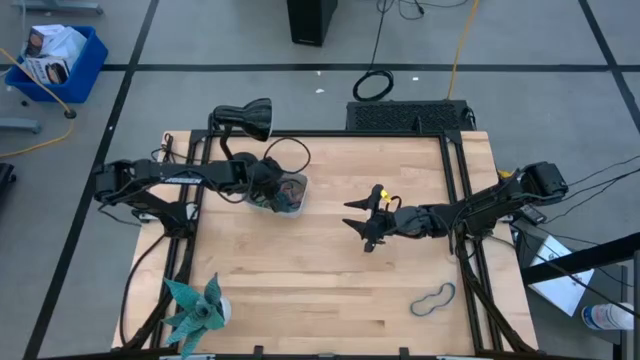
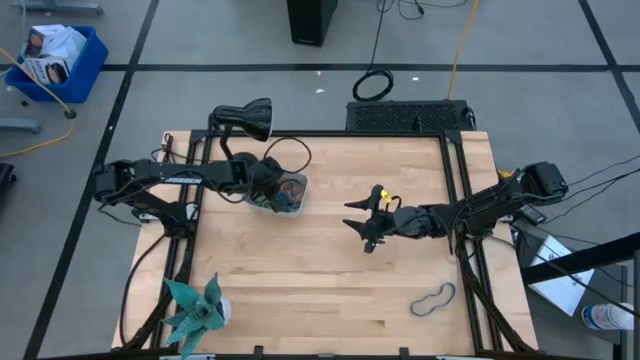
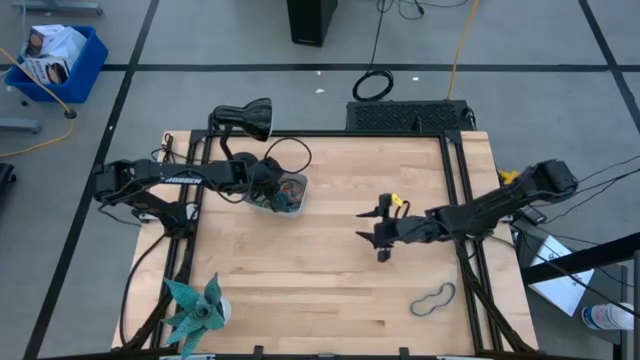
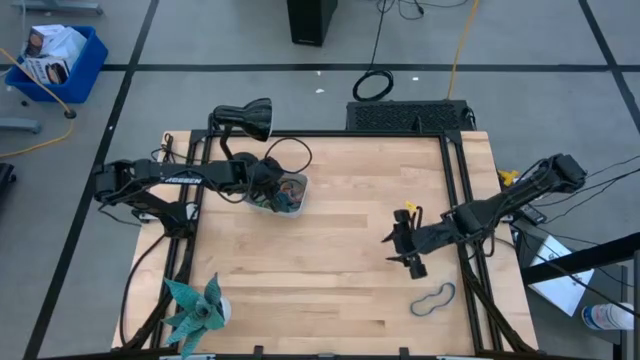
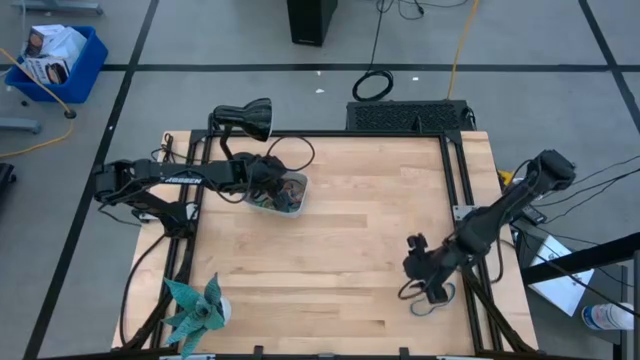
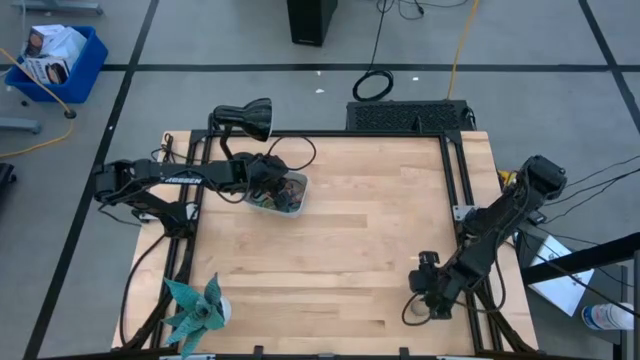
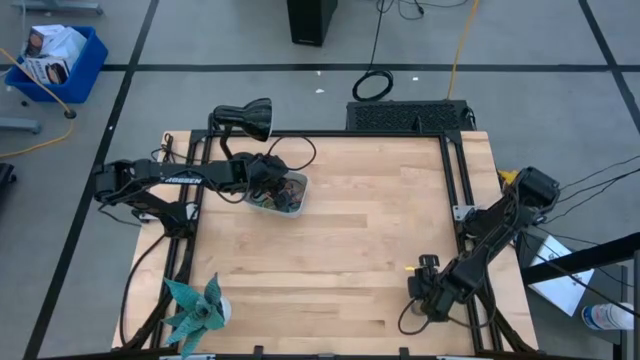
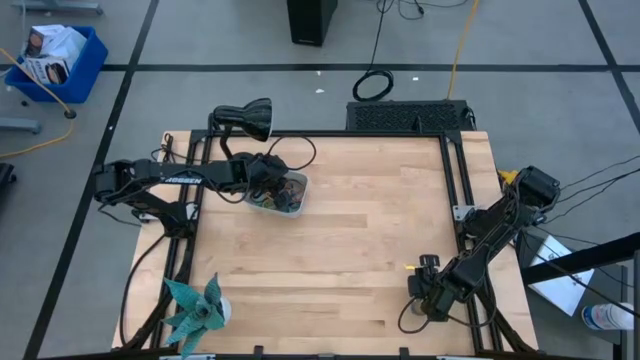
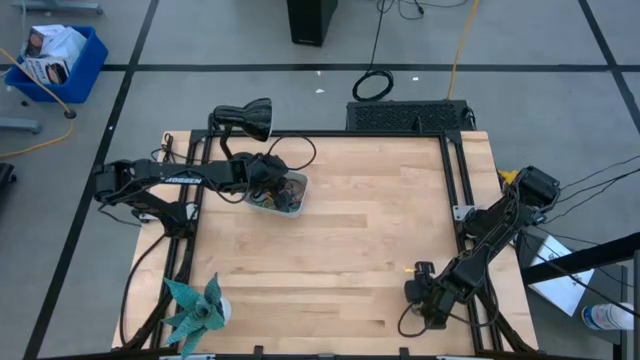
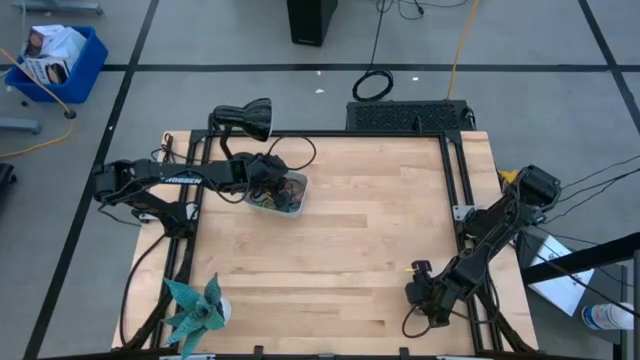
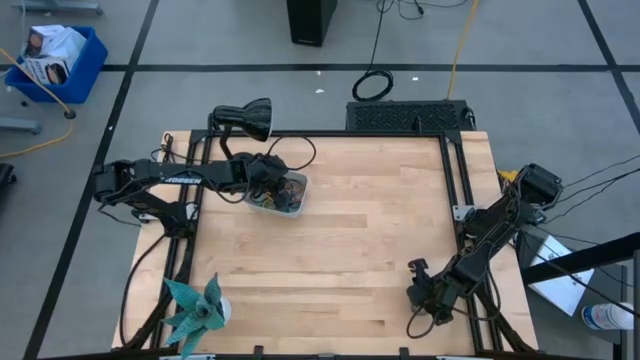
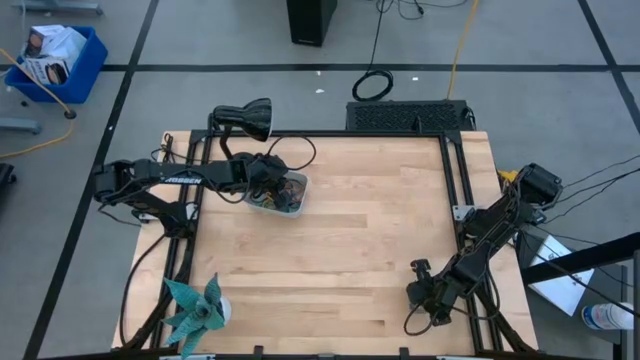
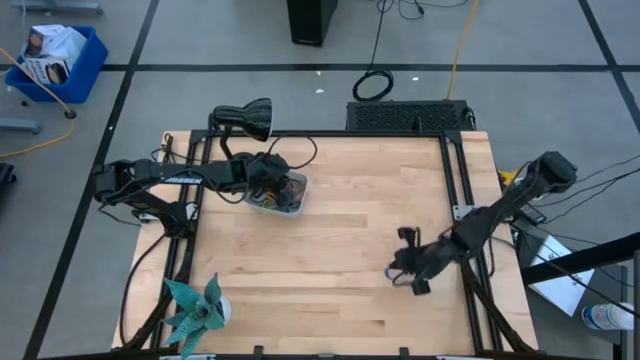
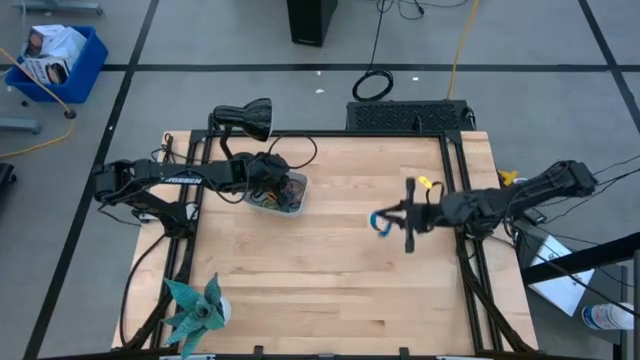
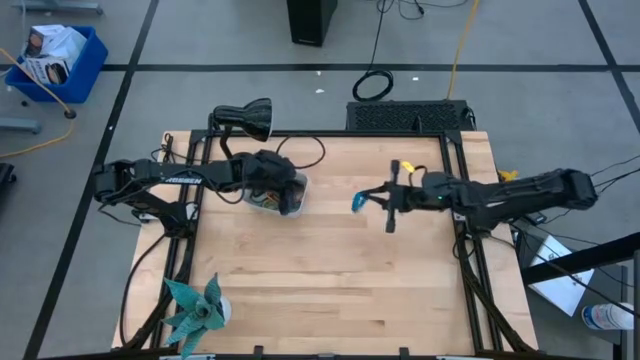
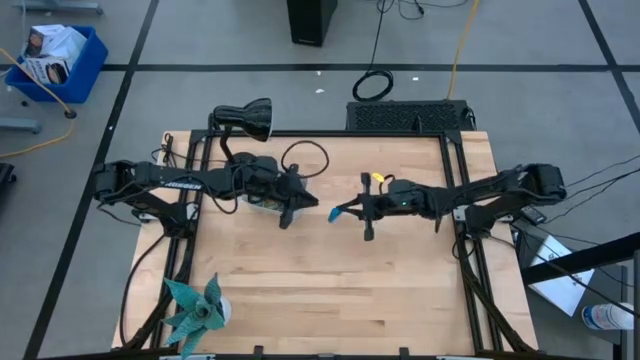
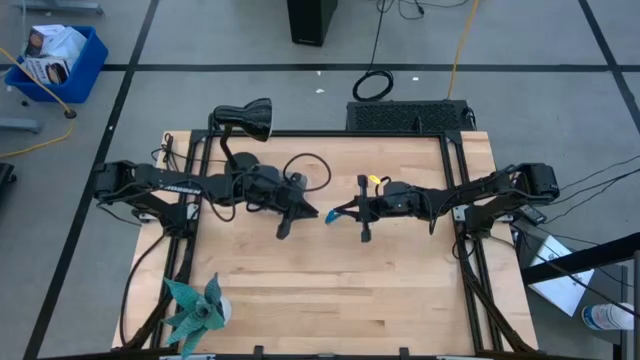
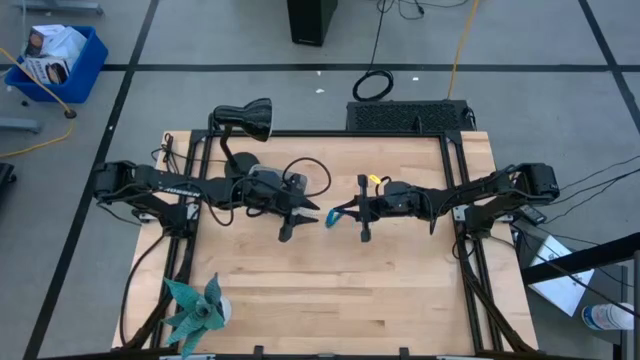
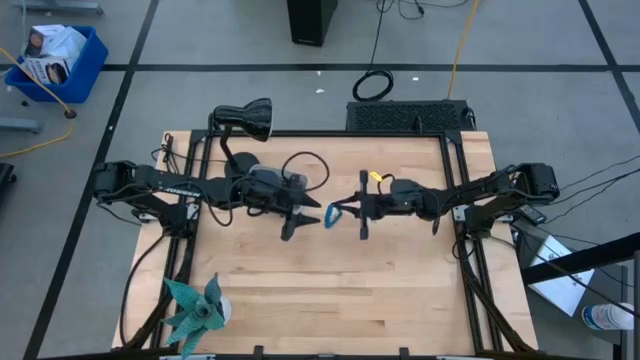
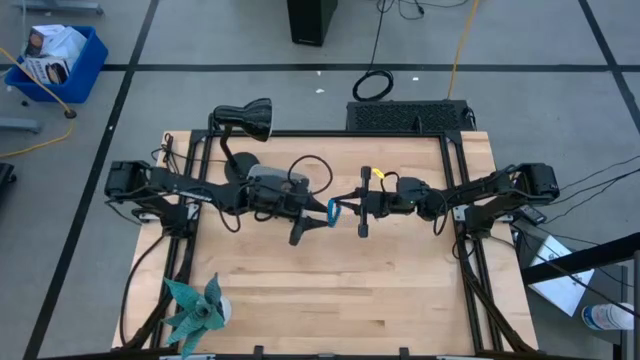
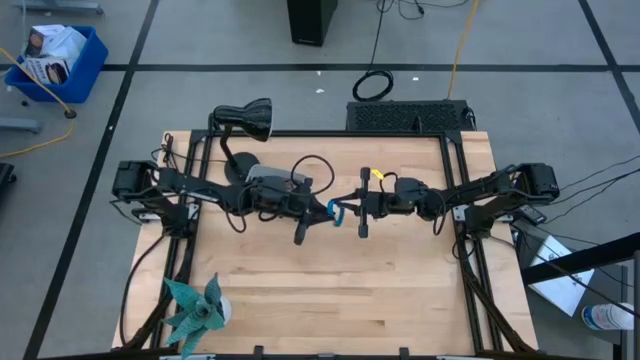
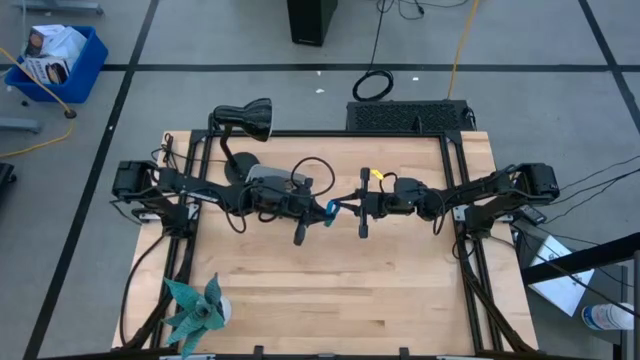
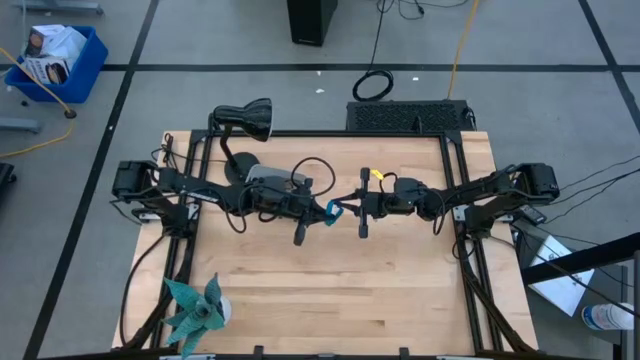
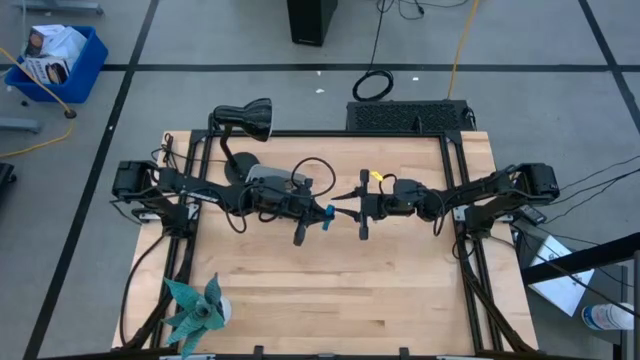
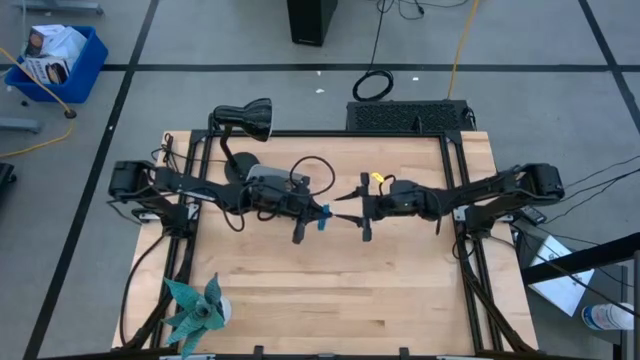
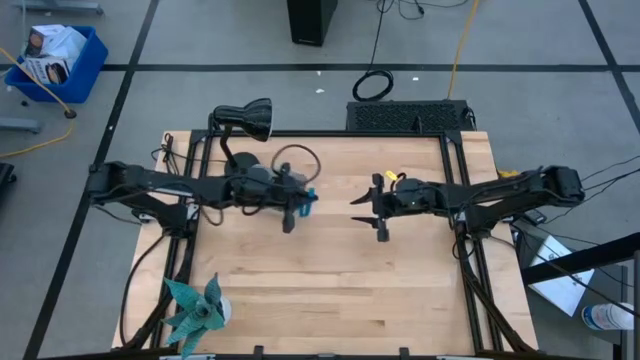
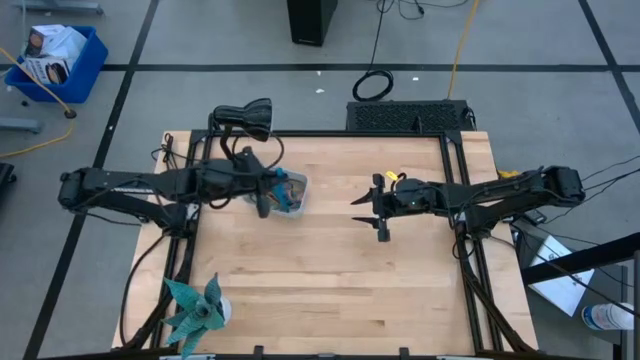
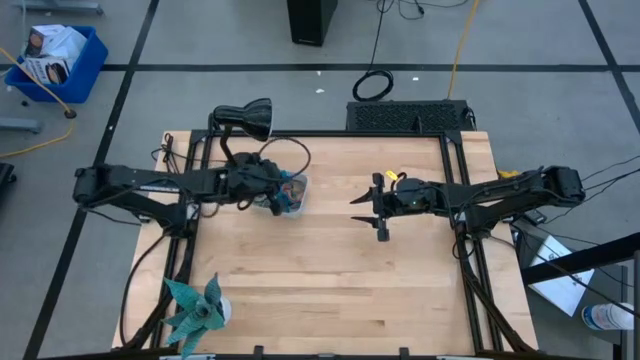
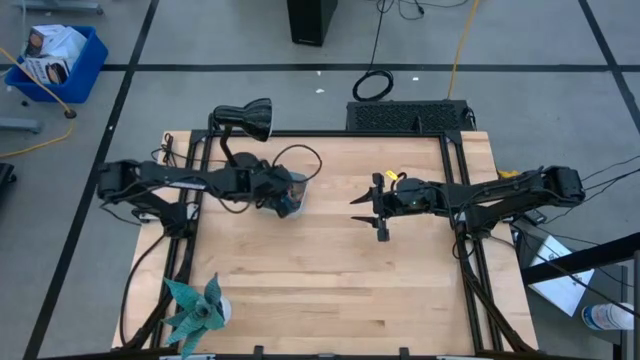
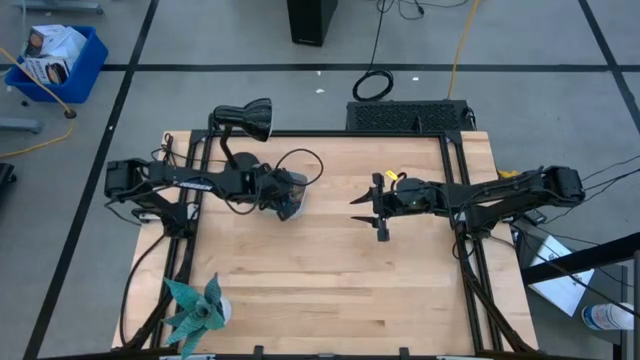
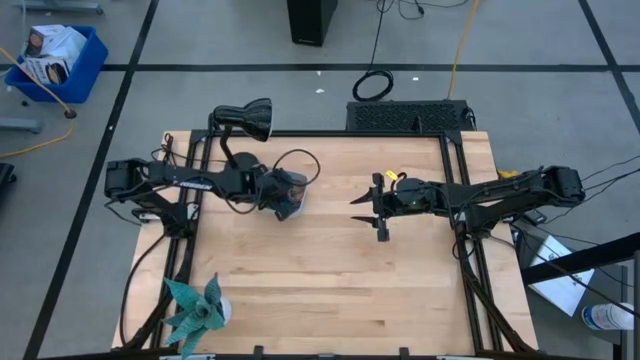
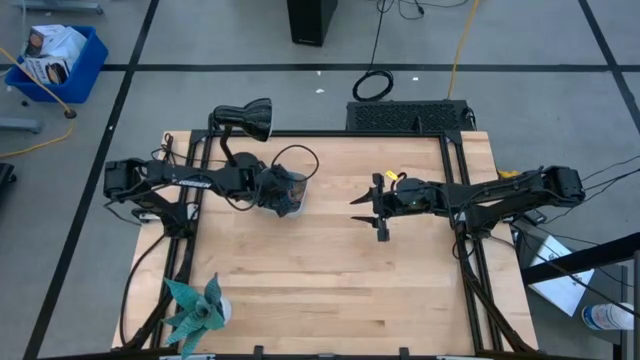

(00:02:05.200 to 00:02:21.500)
Task: Pick and place rubber bands into bin
Put the blue rubber band into the gray bin

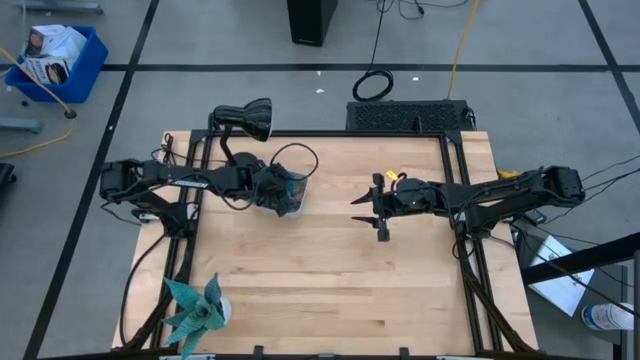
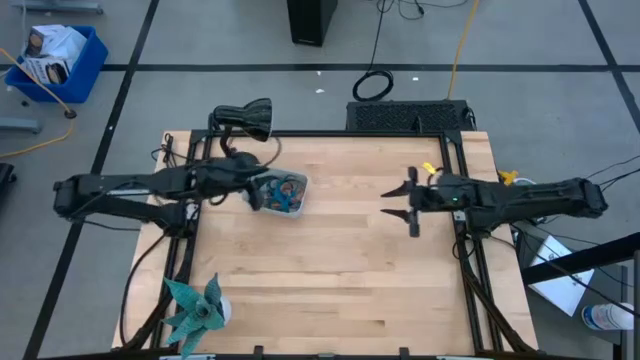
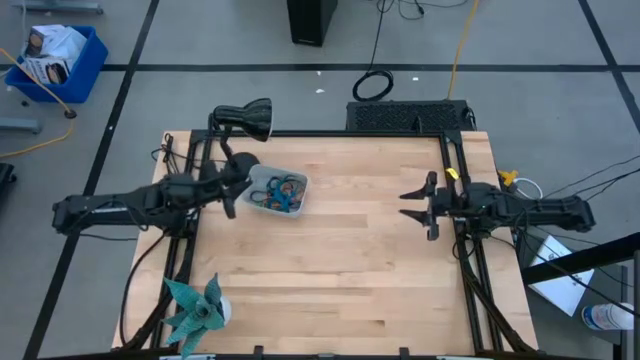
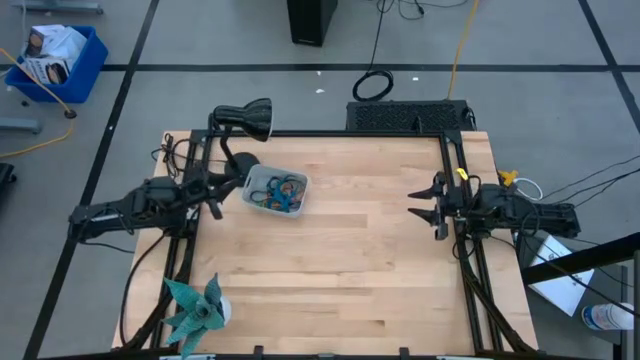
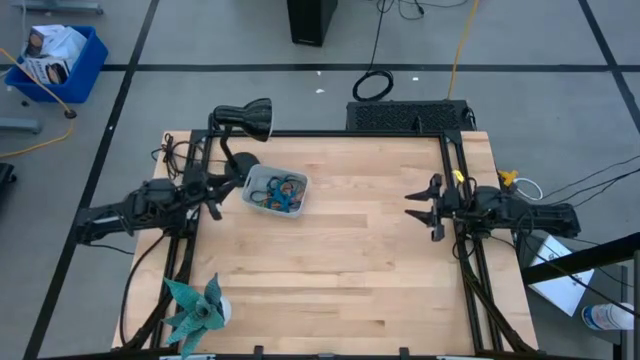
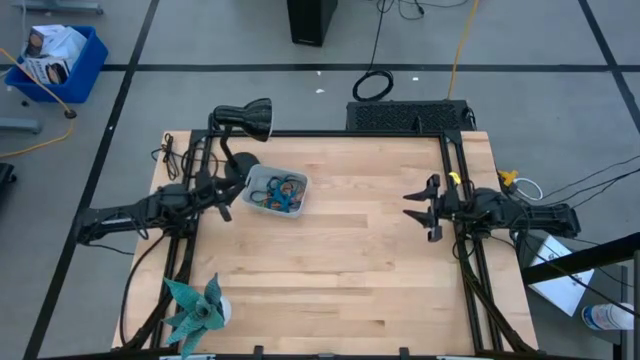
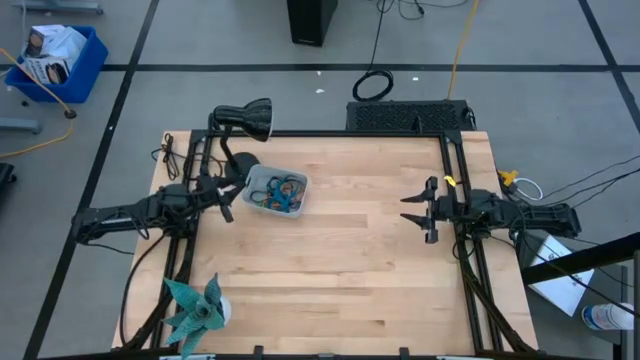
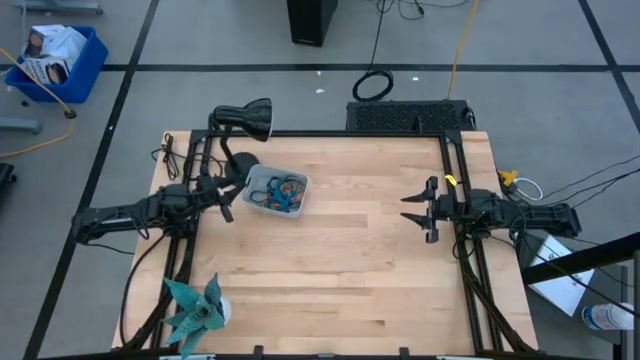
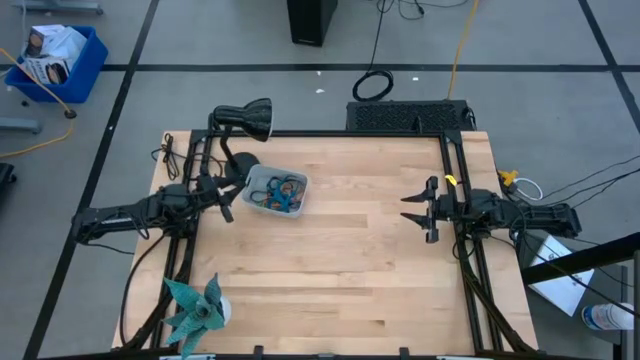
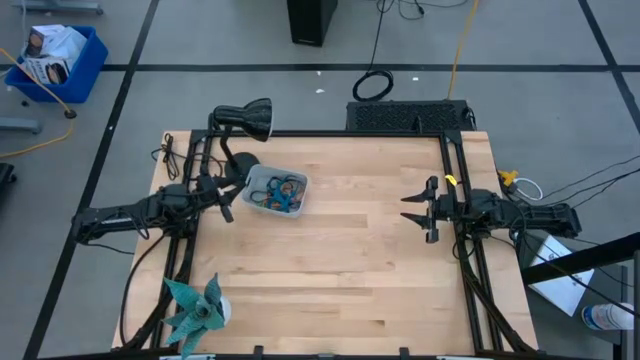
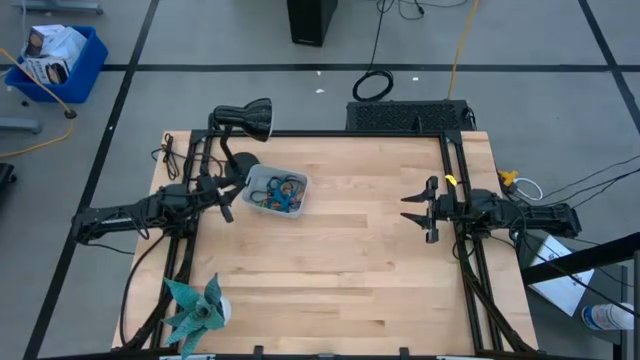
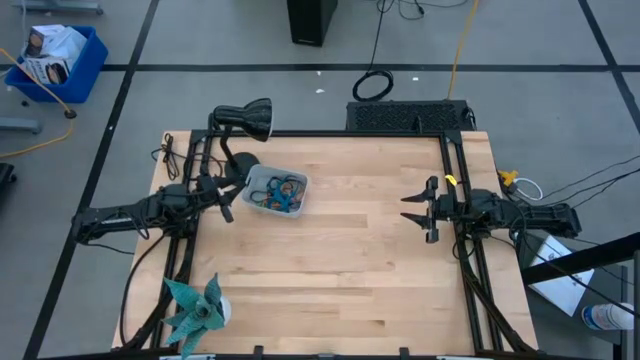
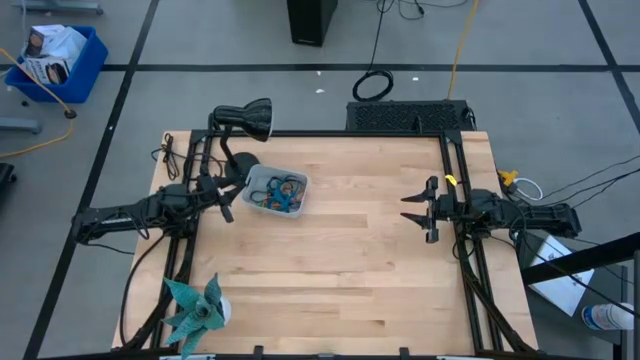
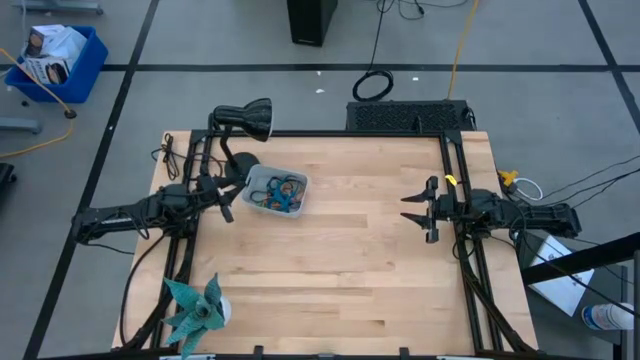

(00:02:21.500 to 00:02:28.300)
Return to Home Position
